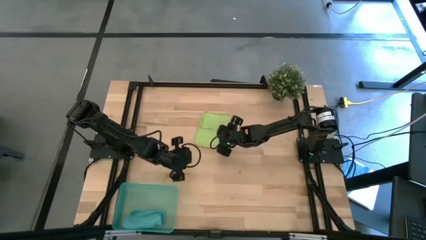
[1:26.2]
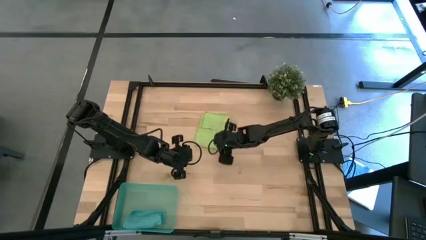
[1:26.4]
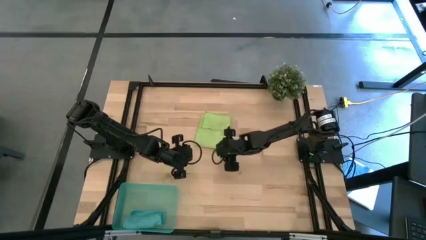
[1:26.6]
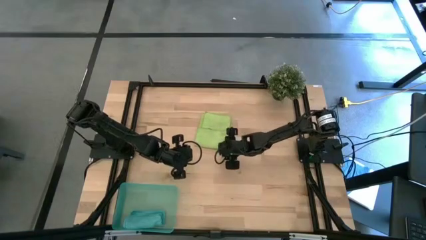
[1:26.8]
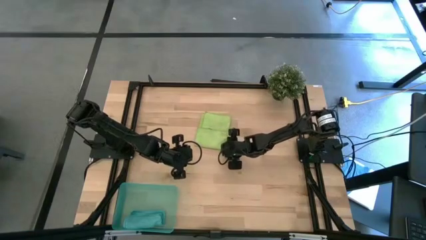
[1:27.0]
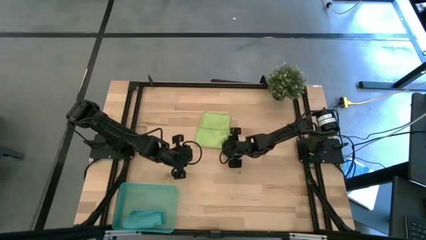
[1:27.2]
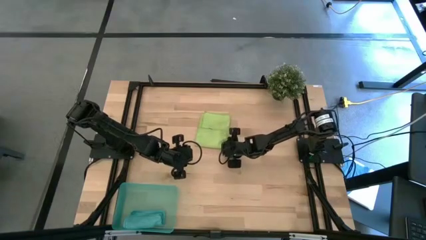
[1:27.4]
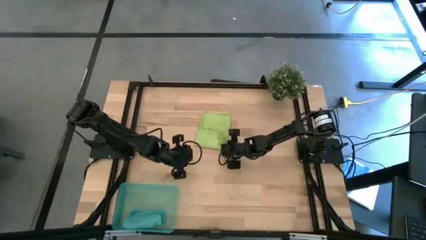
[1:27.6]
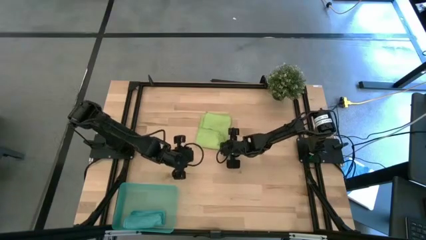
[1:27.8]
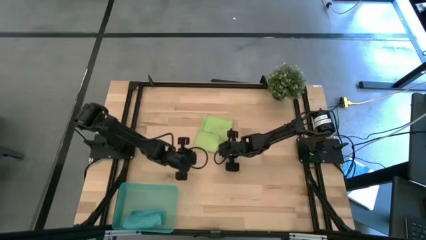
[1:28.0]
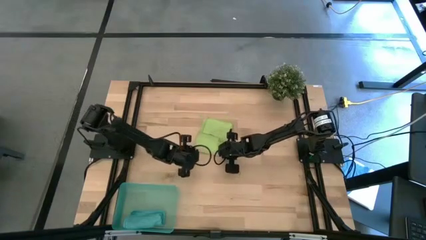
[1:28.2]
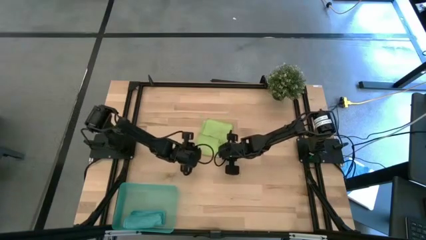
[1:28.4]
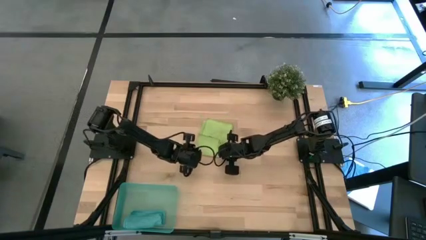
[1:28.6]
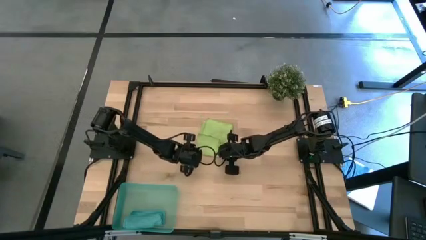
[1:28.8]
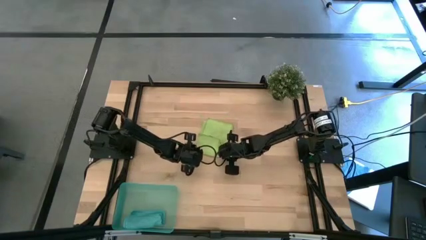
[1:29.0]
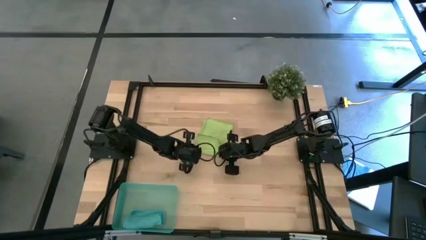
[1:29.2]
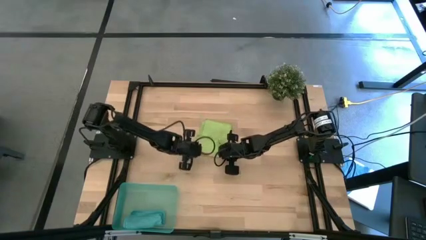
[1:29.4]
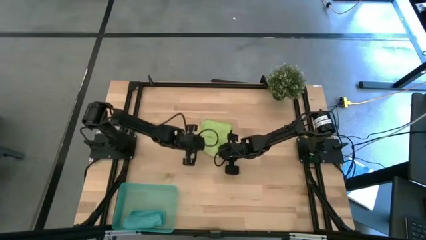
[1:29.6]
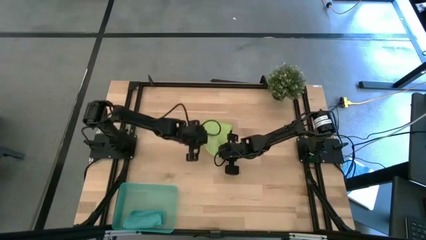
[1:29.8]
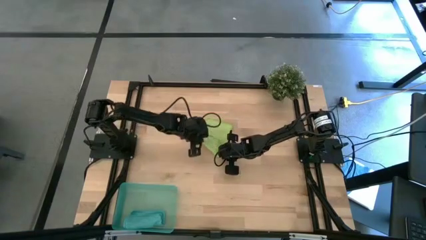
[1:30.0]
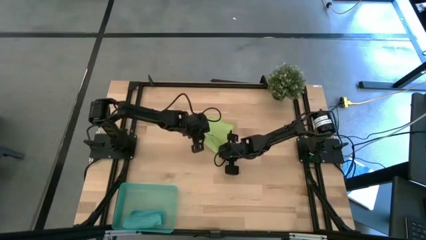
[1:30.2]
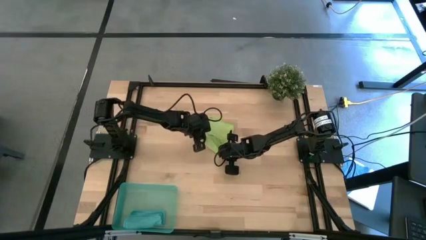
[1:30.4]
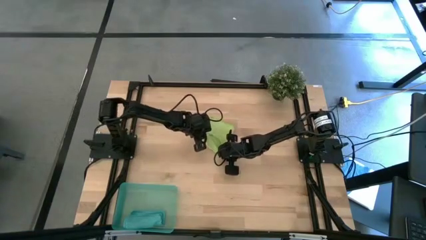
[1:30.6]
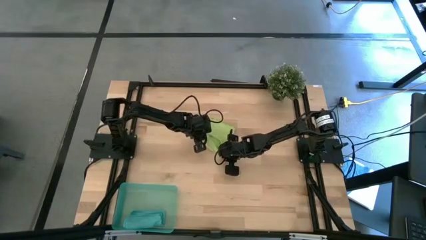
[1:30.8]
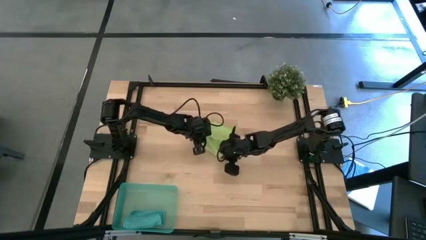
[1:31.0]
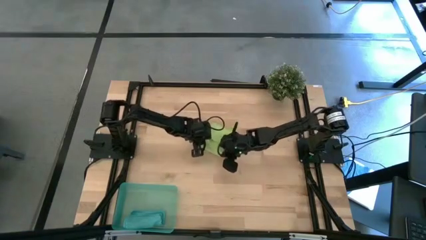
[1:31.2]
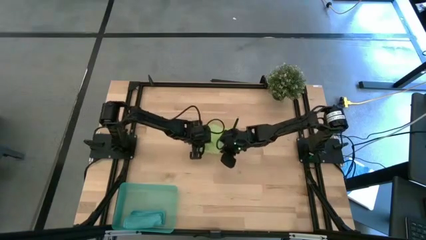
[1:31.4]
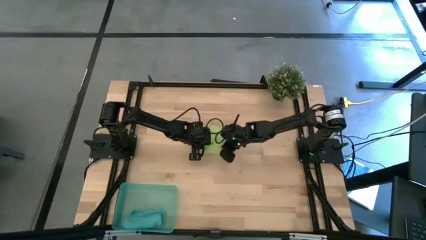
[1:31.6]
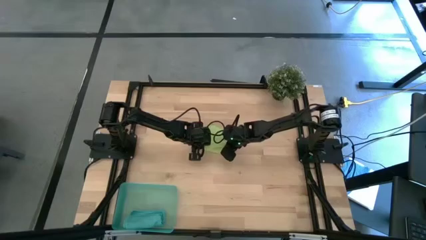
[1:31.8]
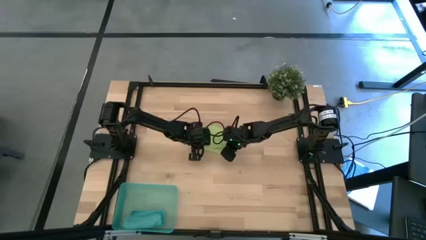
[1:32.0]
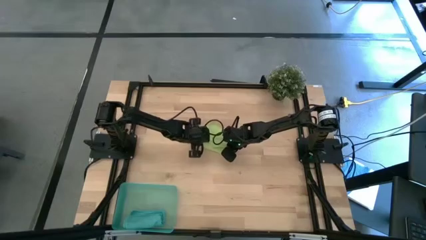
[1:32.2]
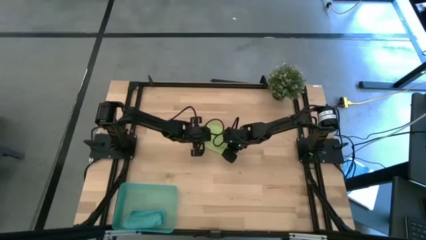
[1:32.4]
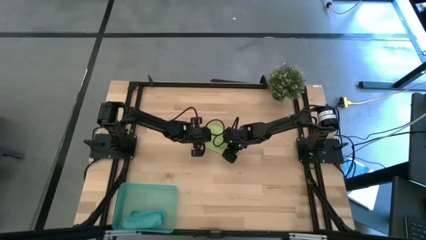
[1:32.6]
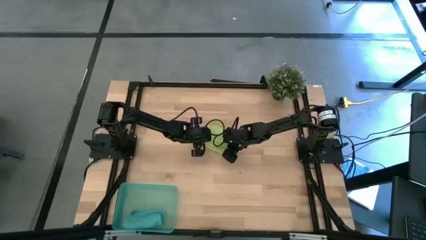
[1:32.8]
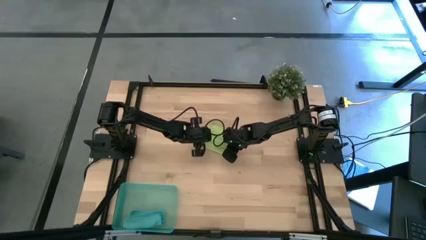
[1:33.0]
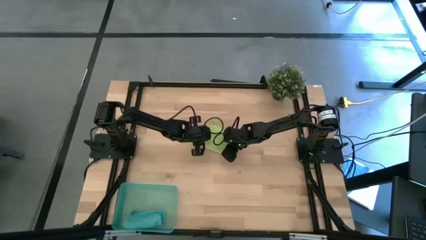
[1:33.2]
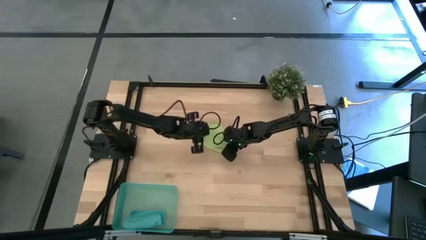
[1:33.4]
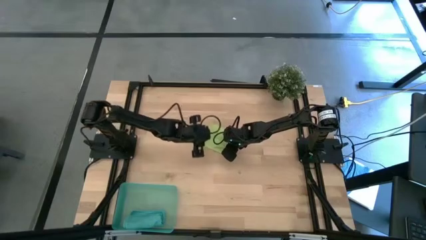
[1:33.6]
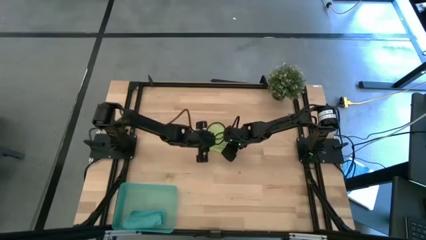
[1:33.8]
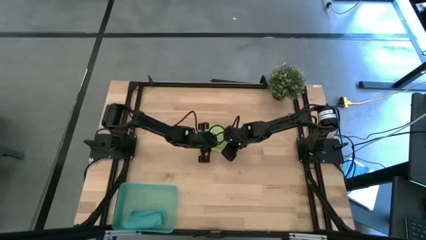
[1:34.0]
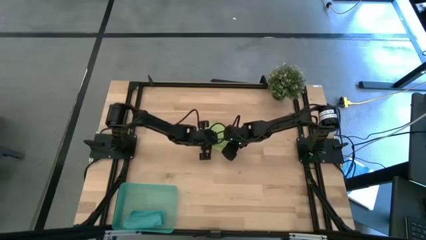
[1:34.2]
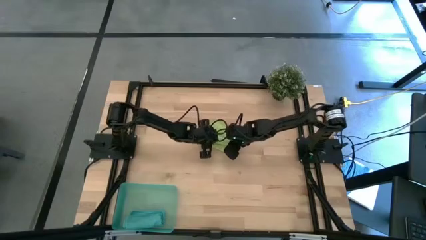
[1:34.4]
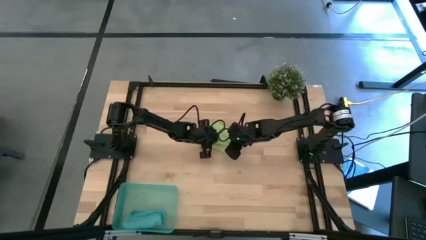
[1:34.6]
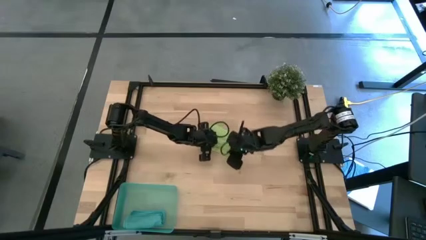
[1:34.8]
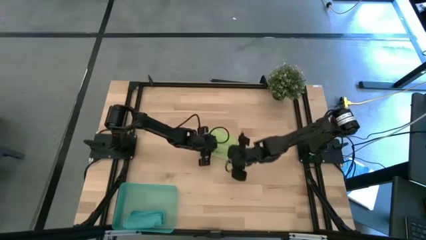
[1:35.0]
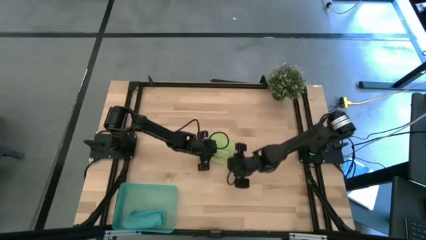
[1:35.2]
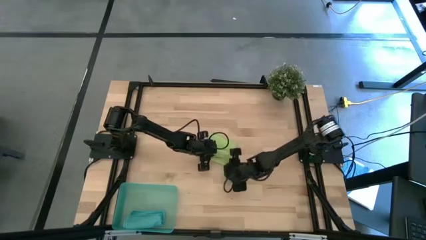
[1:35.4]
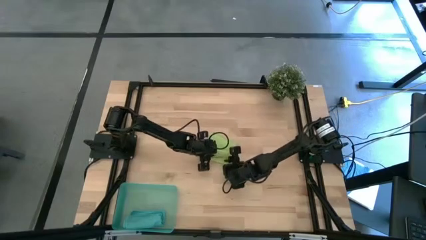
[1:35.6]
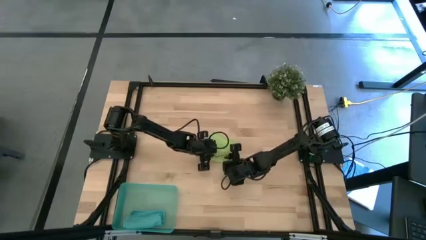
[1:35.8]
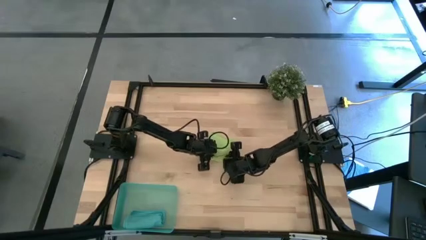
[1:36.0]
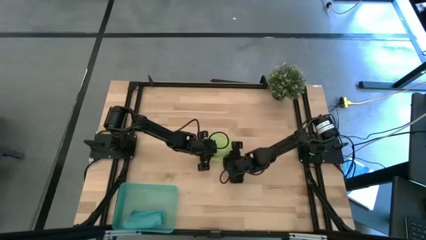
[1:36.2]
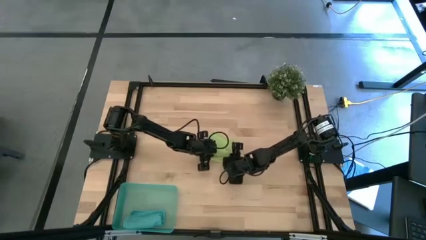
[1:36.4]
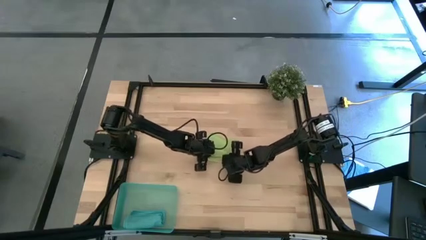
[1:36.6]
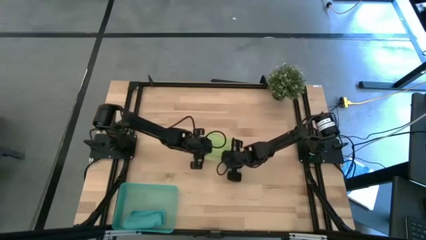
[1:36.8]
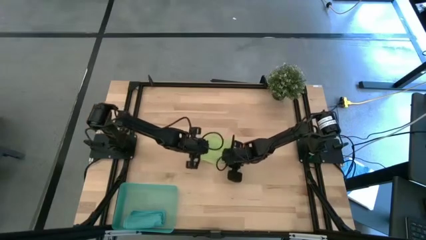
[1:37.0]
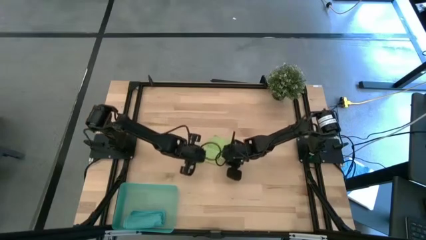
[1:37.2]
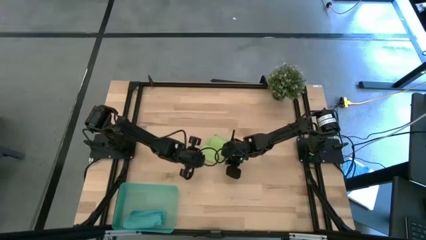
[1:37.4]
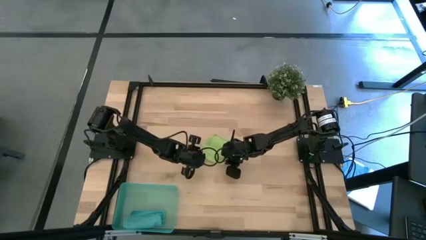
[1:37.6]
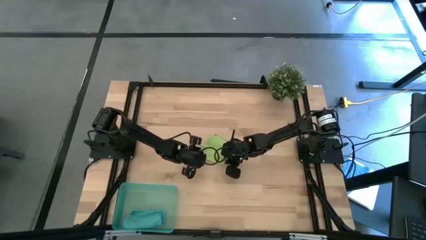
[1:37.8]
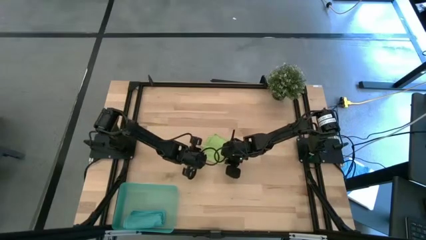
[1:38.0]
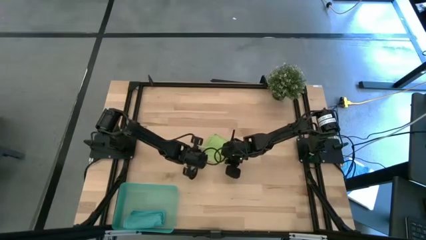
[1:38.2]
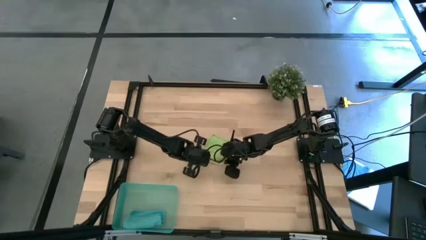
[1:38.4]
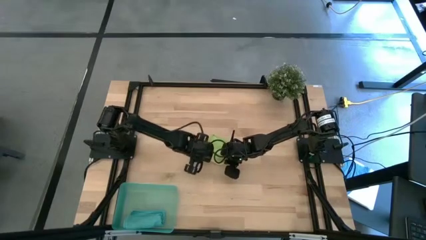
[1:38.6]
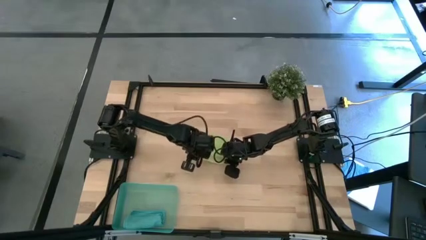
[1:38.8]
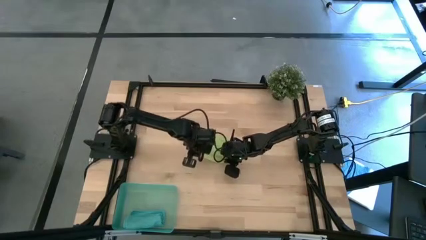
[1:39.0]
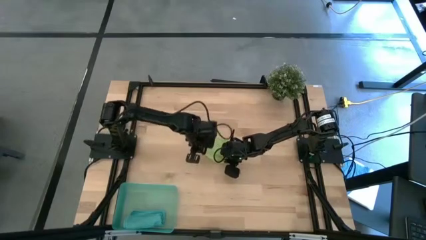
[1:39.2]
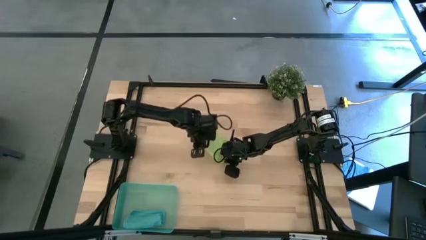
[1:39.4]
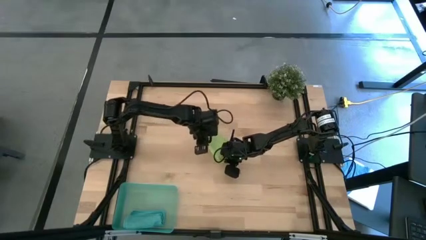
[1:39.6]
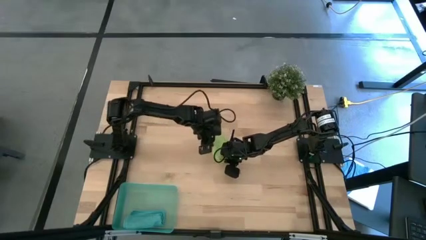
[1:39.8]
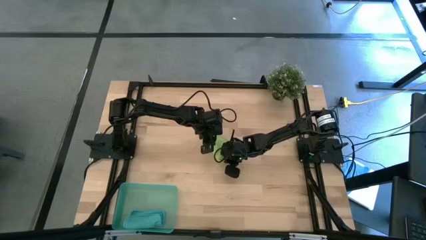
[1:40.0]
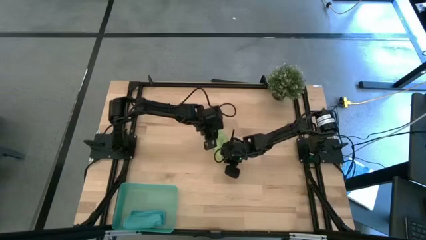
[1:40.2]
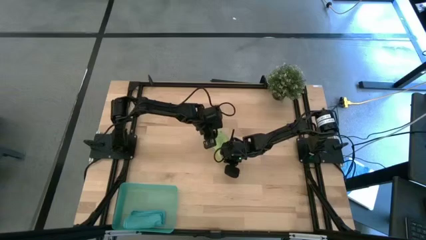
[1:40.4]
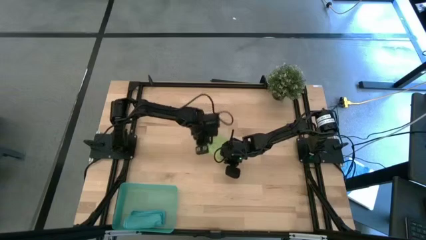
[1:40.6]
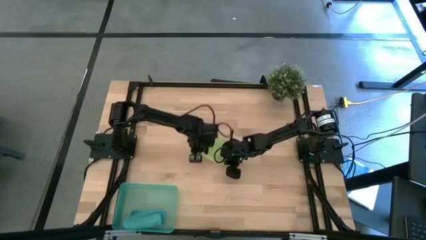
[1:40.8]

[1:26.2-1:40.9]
Task: Roll microfiber towels into tight, uniform cylinder then place into a basket
Roll the yellow green microfiber towel
